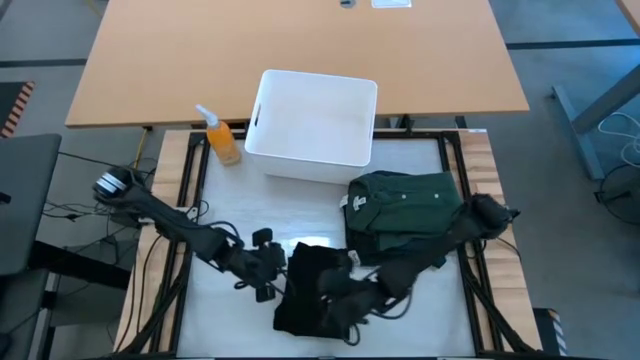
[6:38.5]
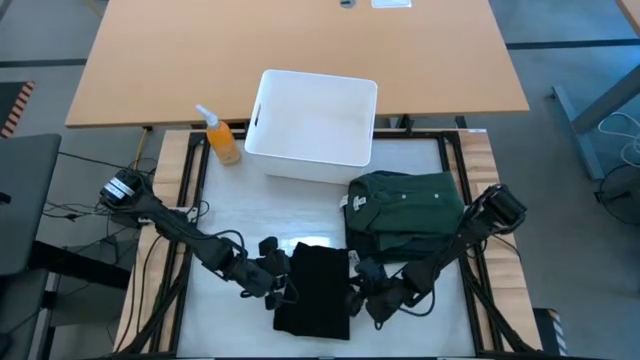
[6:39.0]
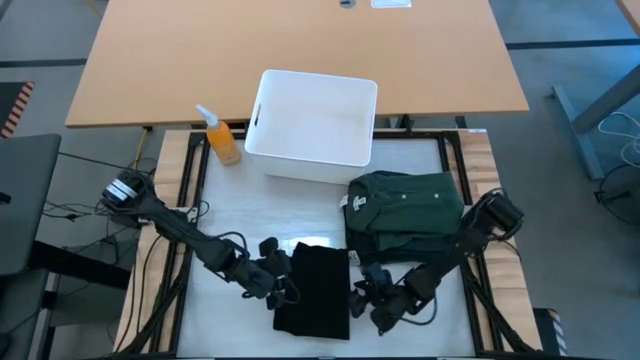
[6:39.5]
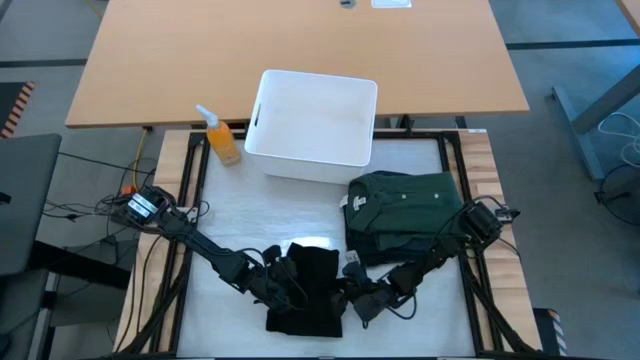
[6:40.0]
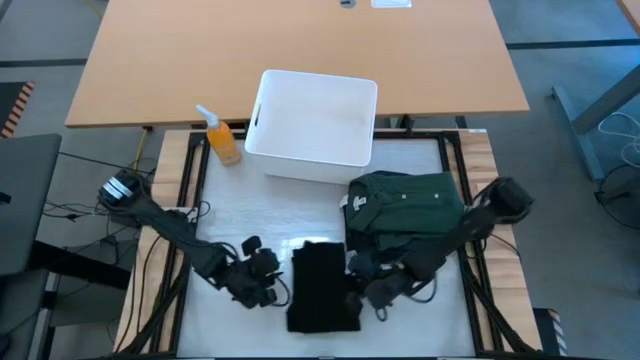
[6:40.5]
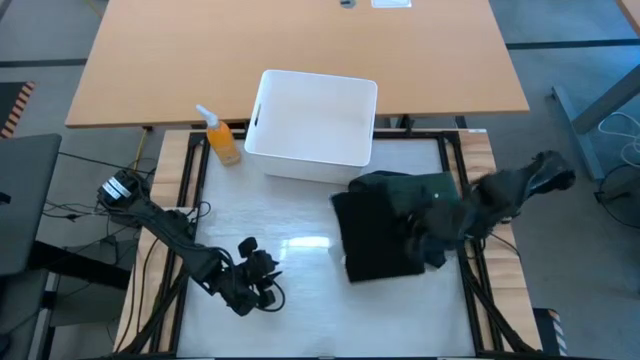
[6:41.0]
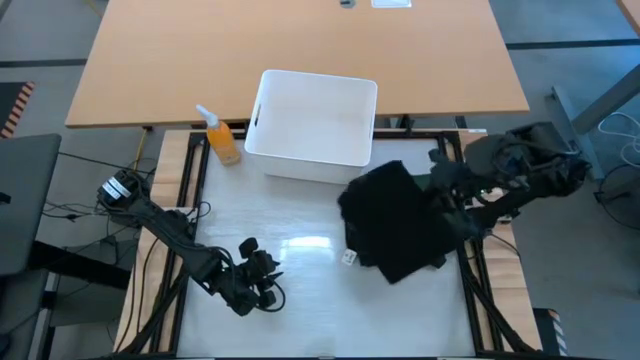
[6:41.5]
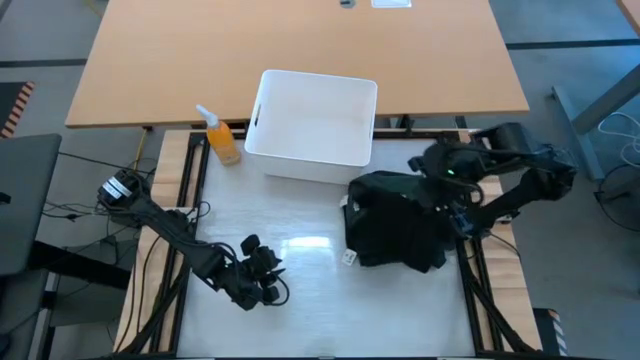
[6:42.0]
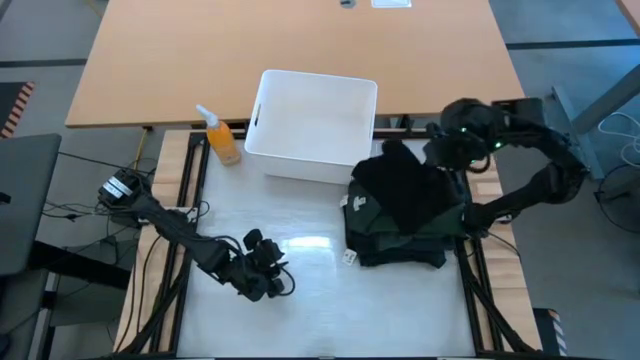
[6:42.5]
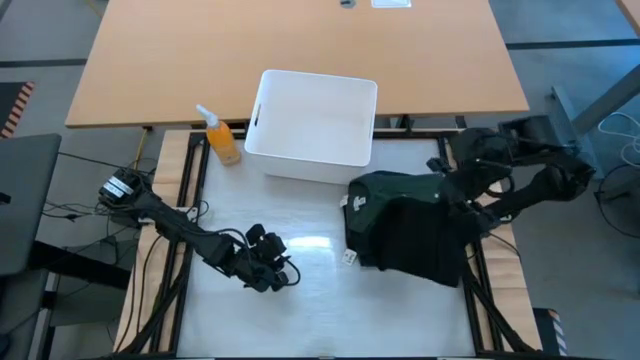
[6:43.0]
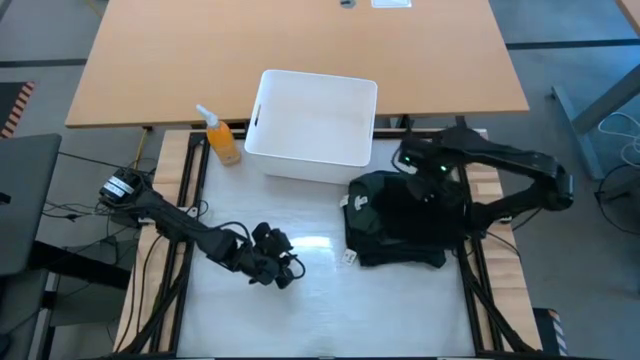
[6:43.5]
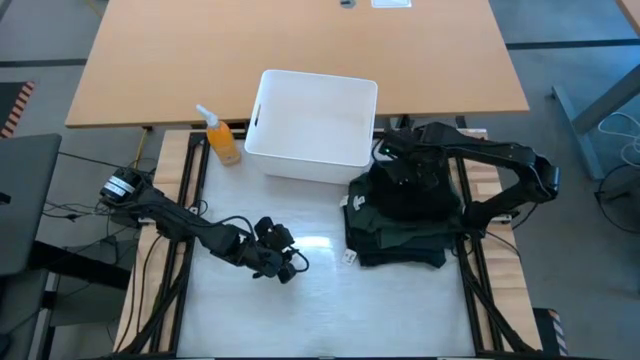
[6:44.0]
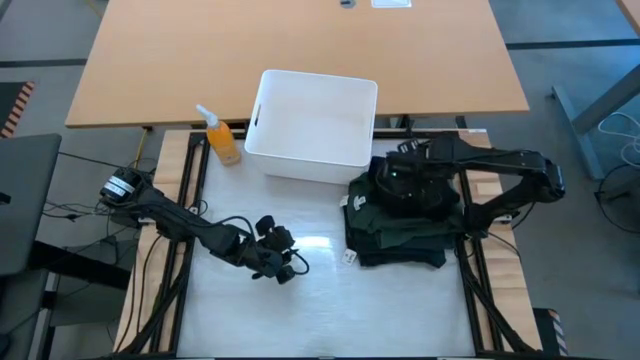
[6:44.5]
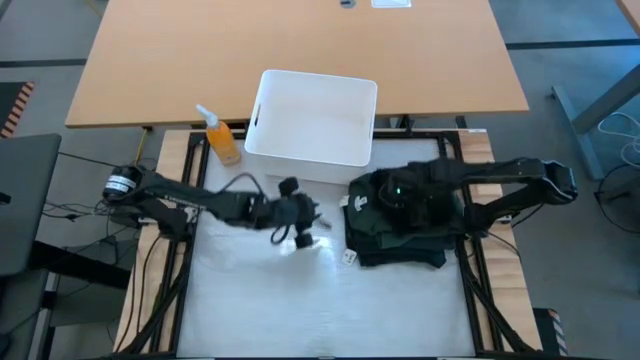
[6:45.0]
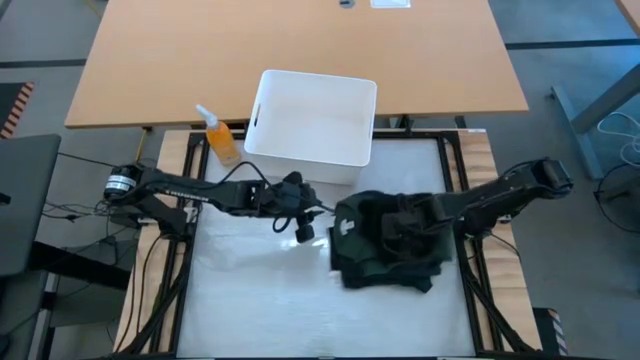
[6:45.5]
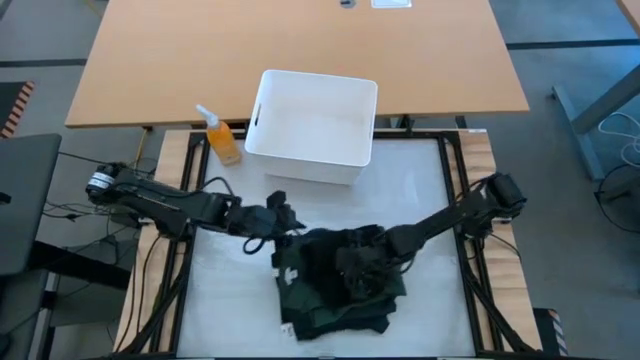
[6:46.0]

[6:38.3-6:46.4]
Task: Fold laundry
Stack the folded black shirt on top of the folded green polo shirt

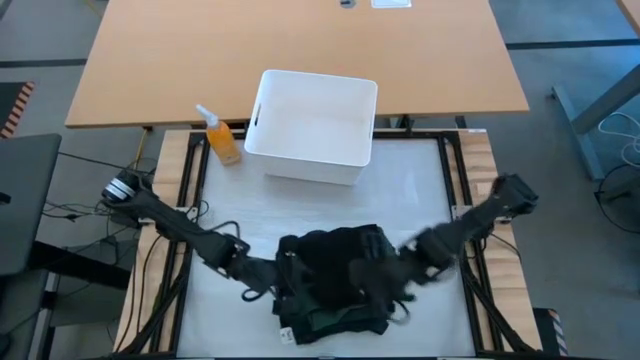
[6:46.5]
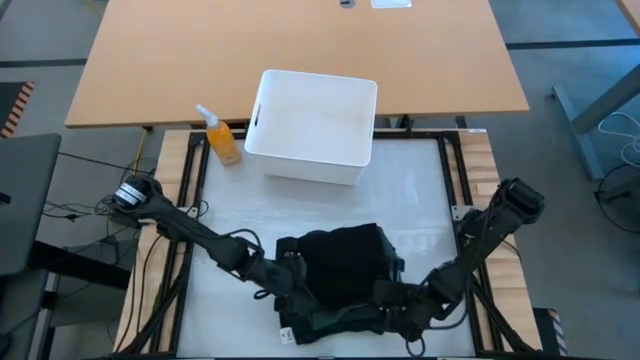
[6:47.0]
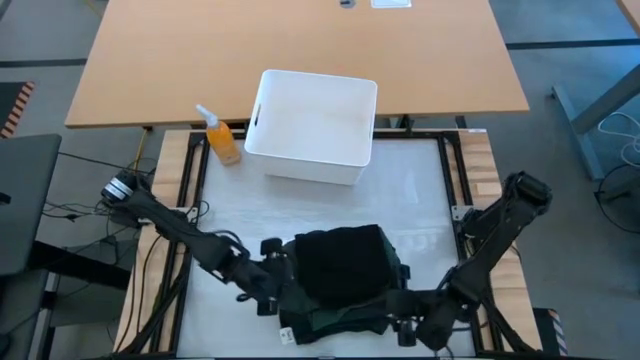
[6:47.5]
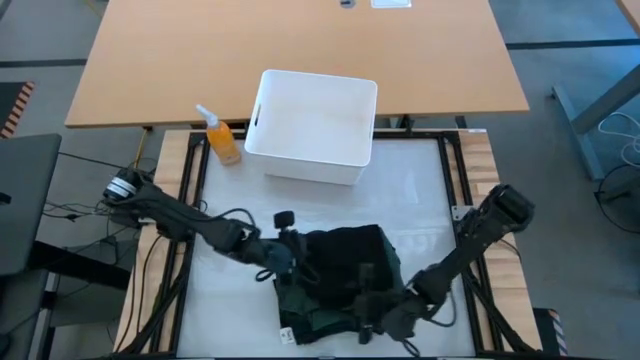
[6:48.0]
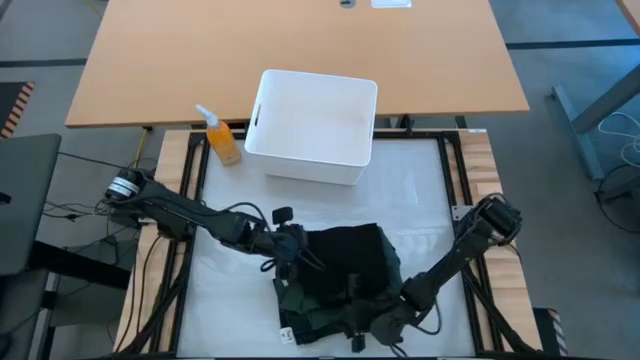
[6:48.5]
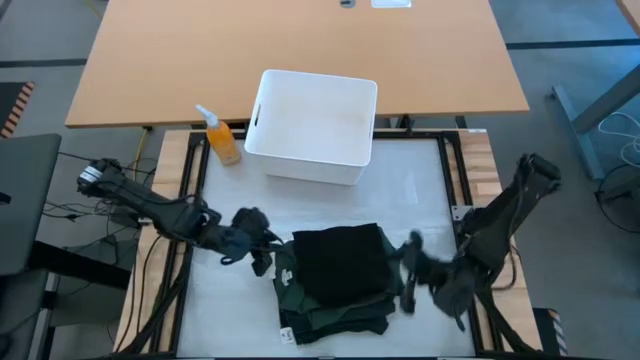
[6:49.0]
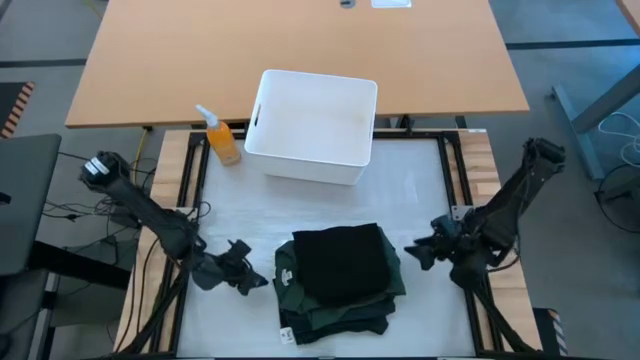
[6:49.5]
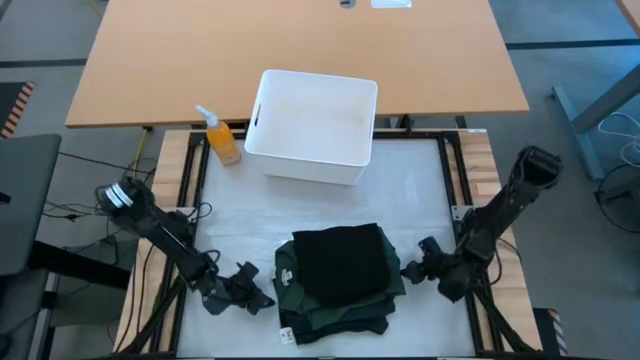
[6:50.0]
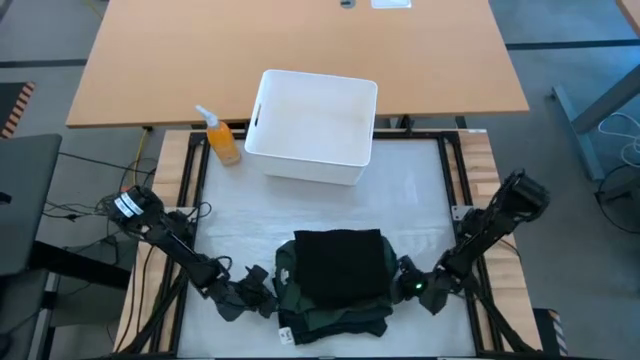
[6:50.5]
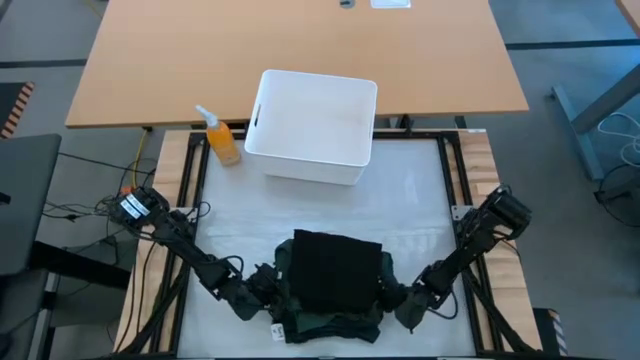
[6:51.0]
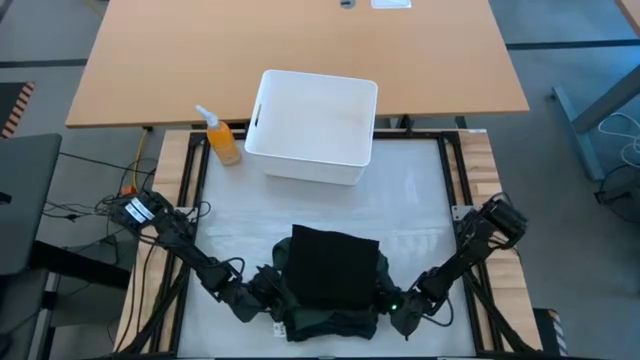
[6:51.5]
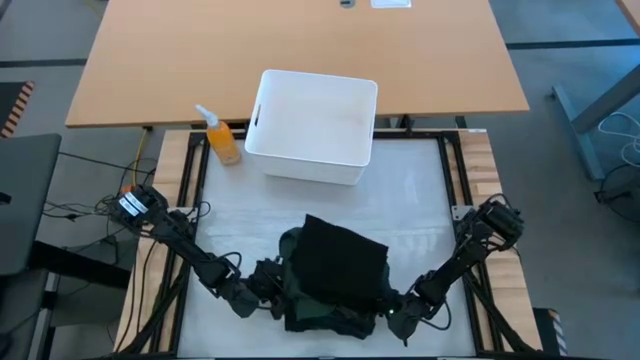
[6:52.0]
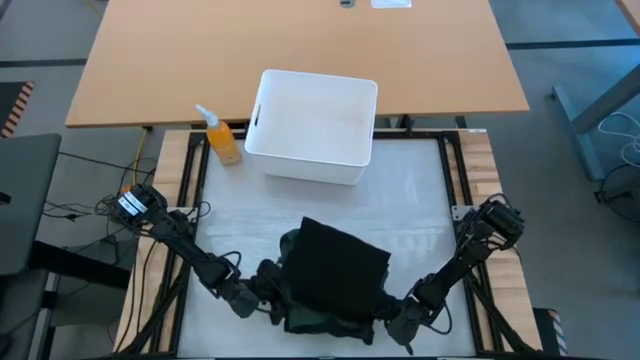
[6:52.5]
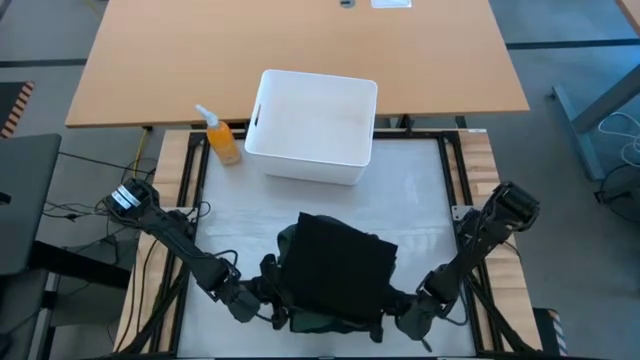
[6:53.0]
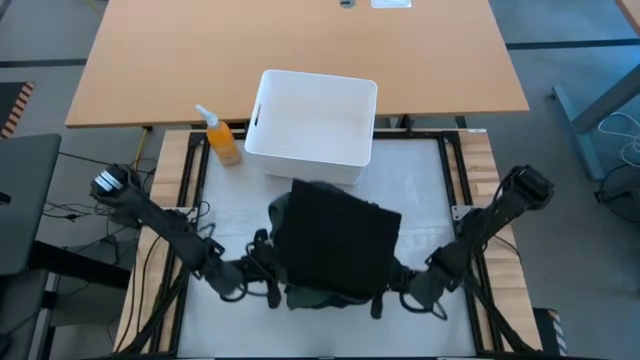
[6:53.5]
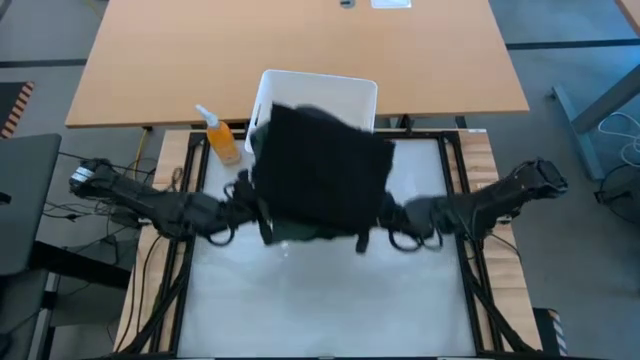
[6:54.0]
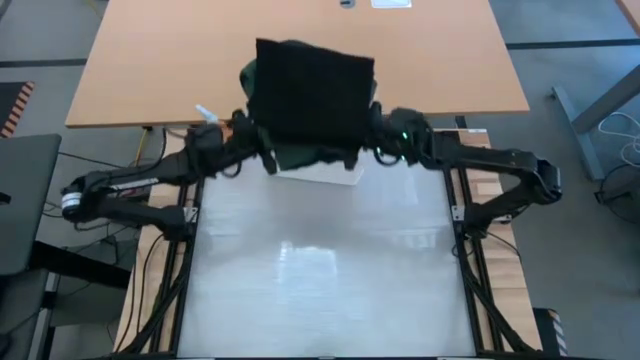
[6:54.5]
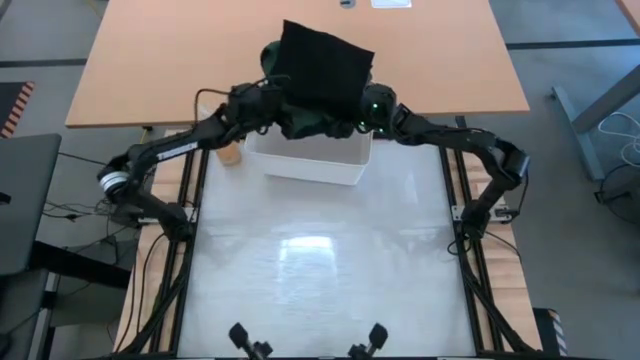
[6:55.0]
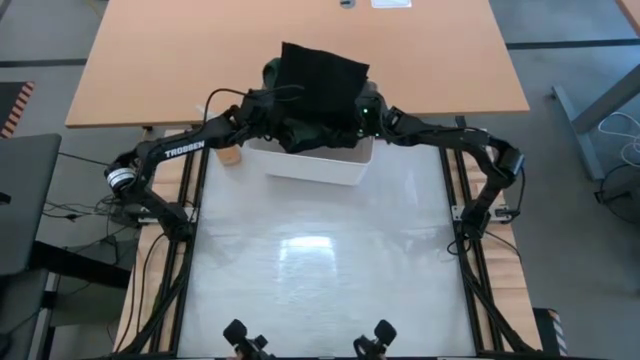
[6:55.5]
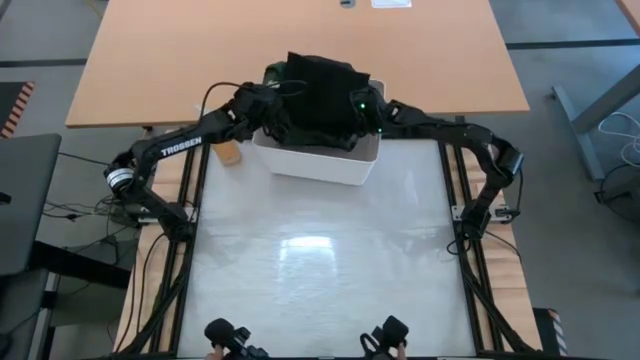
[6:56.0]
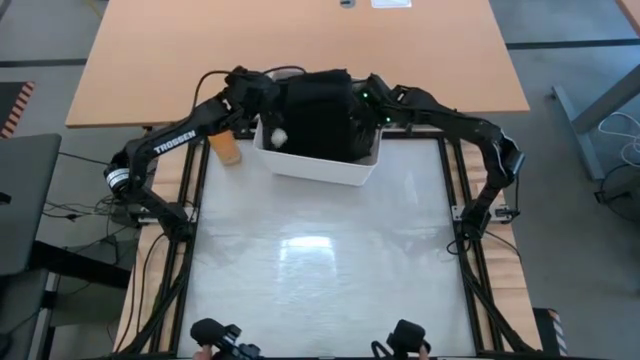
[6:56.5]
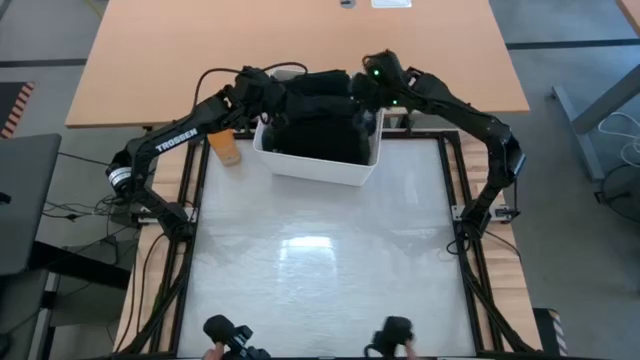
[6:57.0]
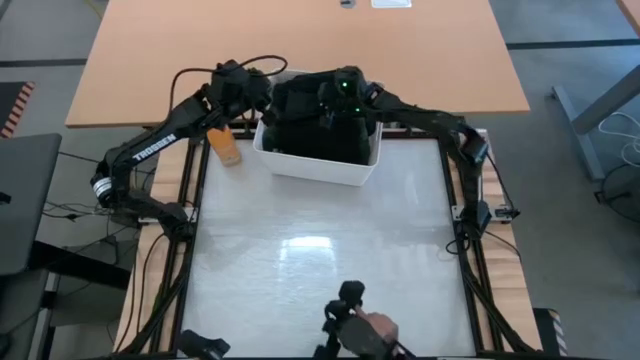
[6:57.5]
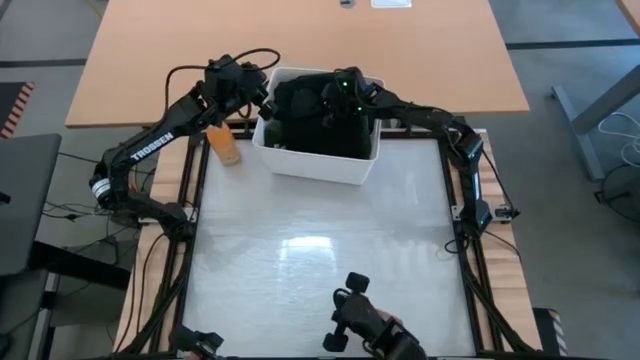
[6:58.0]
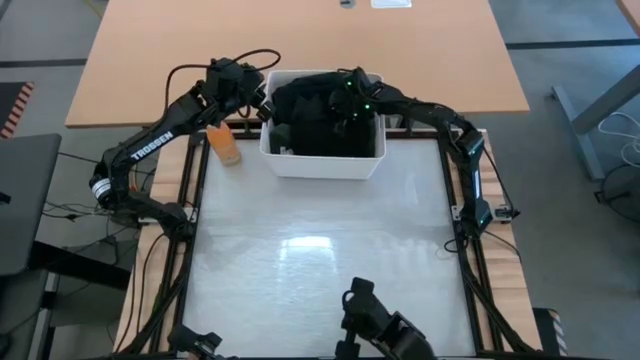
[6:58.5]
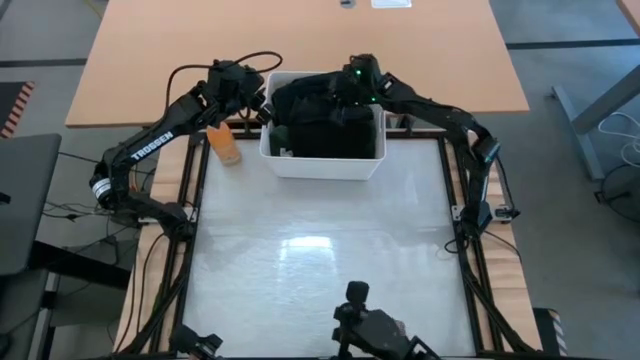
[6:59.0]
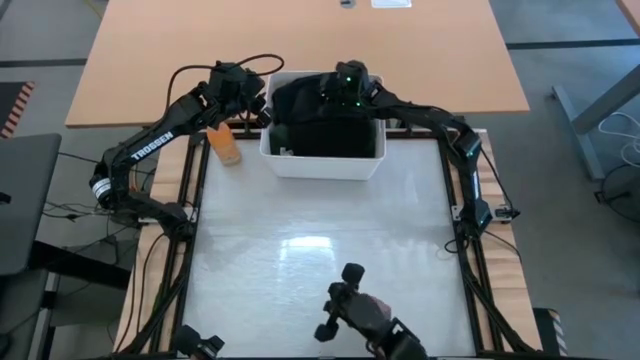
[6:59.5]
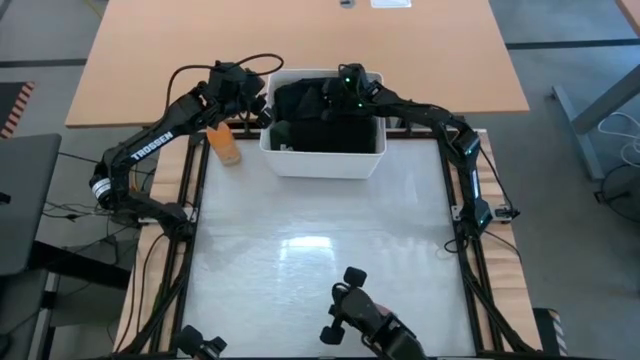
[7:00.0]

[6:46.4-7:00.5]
Put the stacked of clothes into the white laundry organizer
